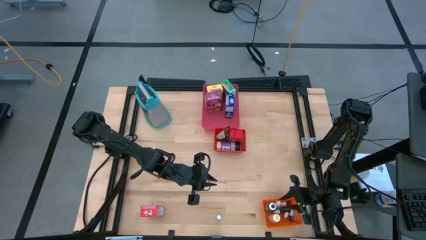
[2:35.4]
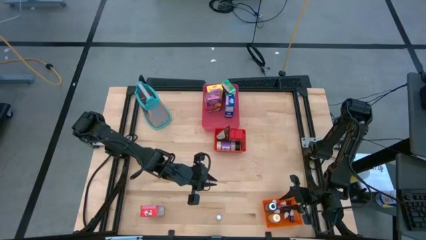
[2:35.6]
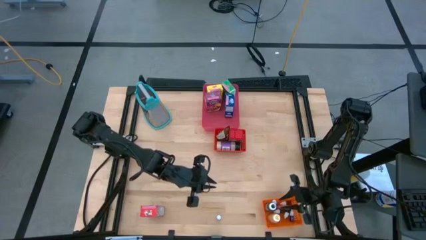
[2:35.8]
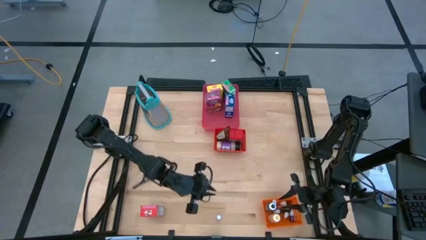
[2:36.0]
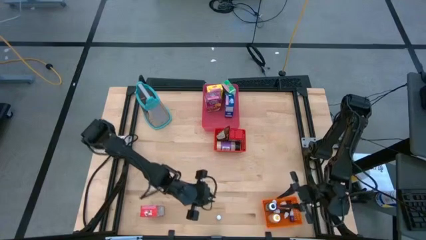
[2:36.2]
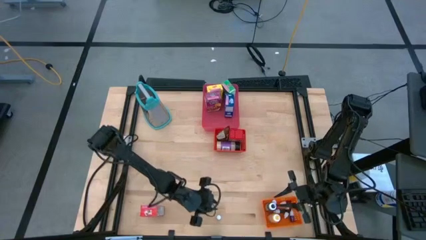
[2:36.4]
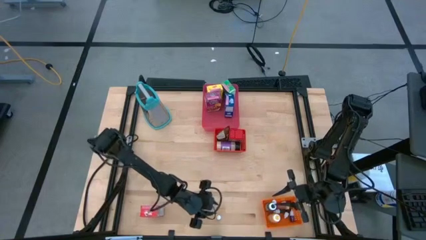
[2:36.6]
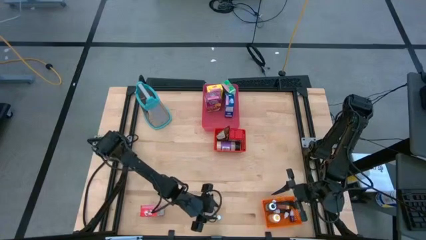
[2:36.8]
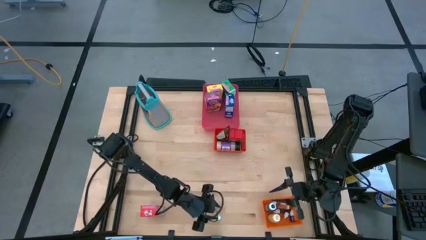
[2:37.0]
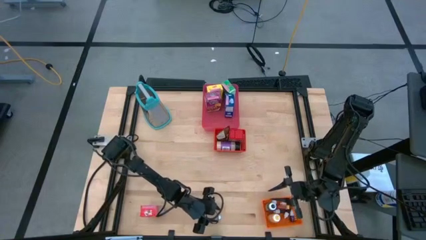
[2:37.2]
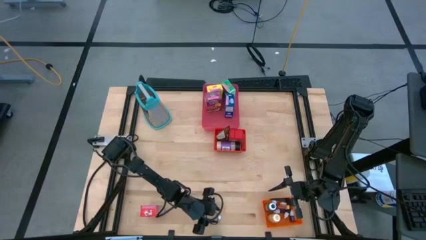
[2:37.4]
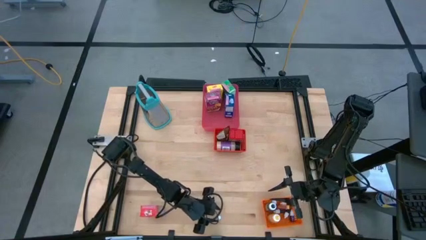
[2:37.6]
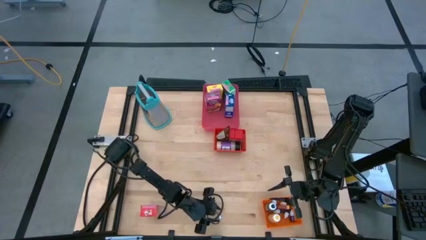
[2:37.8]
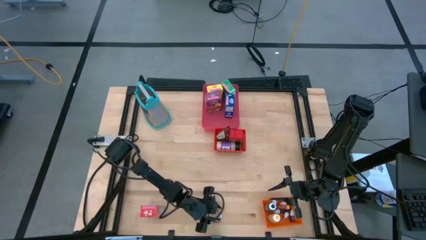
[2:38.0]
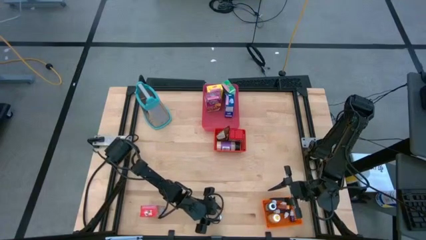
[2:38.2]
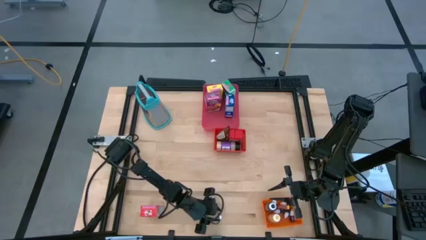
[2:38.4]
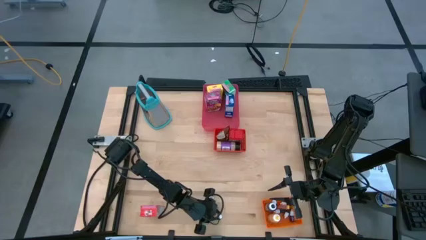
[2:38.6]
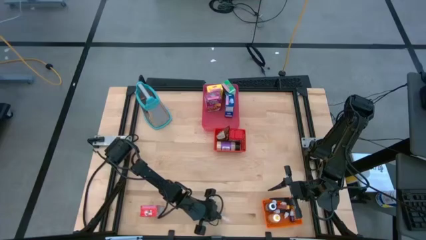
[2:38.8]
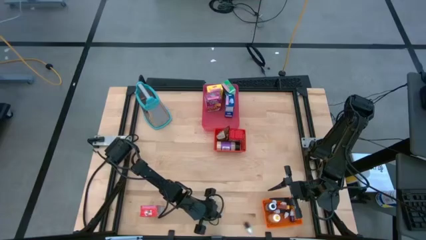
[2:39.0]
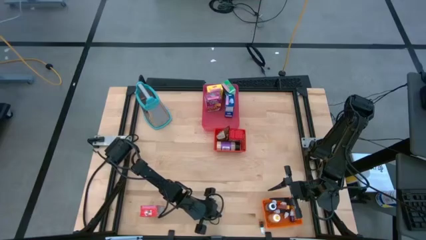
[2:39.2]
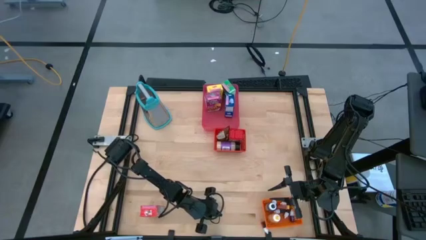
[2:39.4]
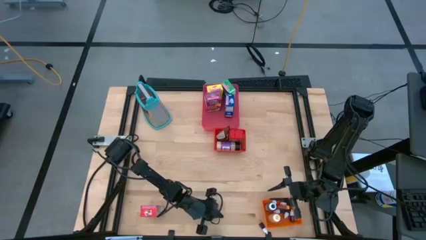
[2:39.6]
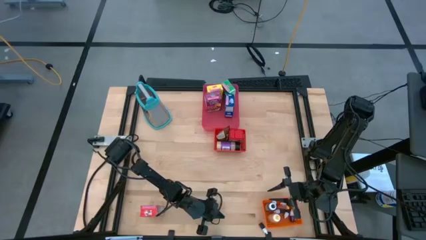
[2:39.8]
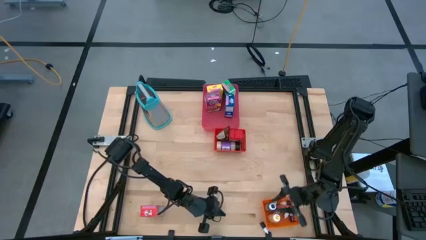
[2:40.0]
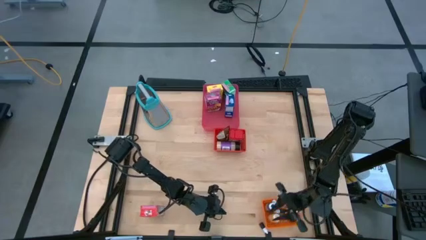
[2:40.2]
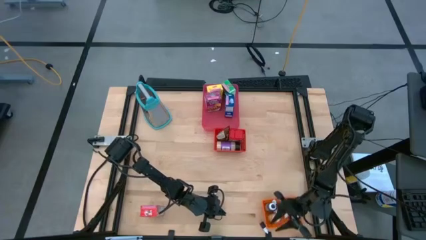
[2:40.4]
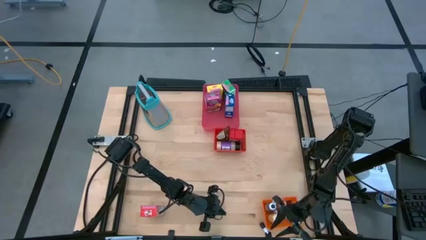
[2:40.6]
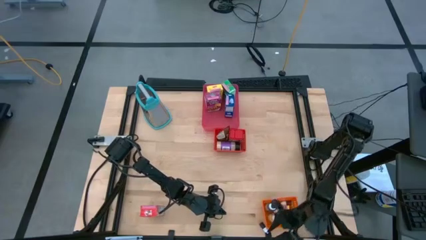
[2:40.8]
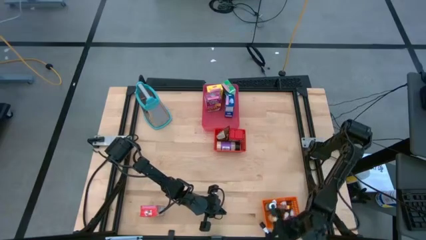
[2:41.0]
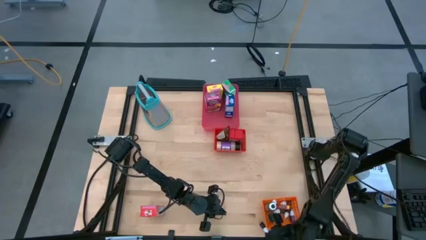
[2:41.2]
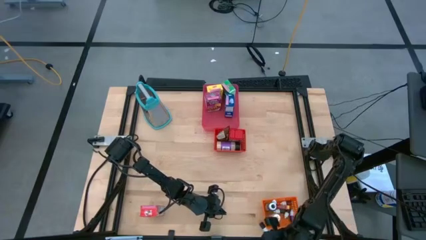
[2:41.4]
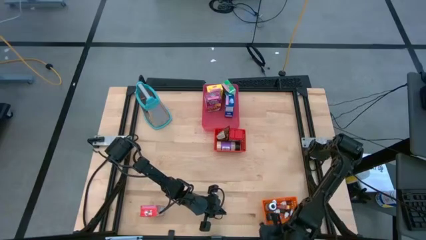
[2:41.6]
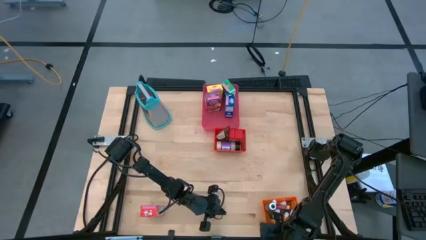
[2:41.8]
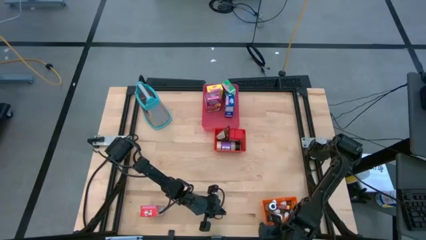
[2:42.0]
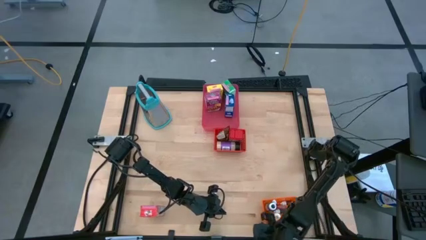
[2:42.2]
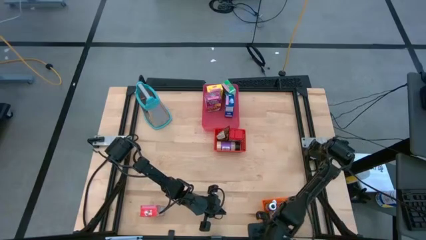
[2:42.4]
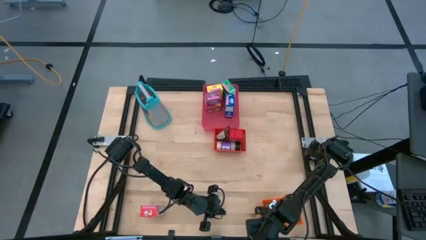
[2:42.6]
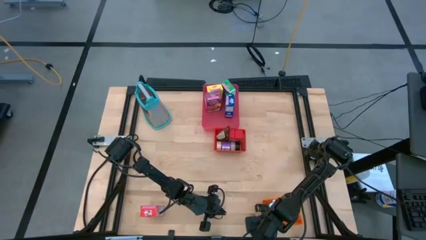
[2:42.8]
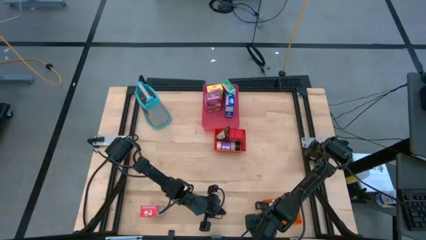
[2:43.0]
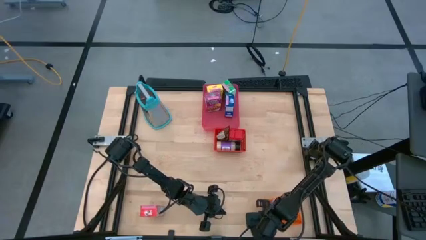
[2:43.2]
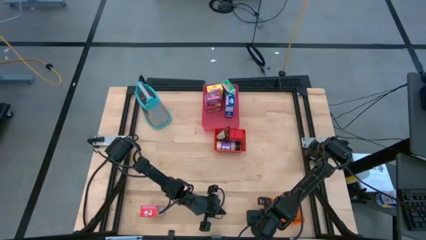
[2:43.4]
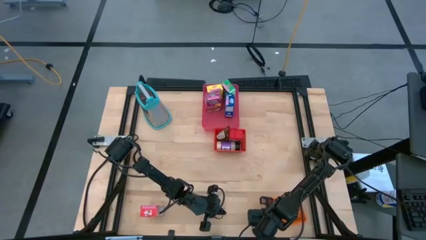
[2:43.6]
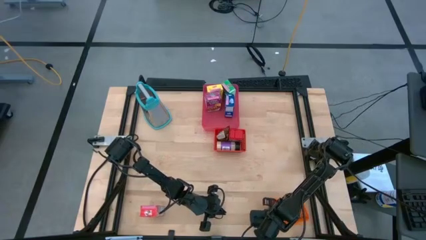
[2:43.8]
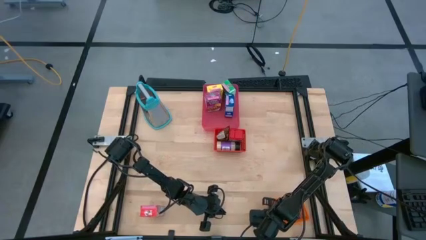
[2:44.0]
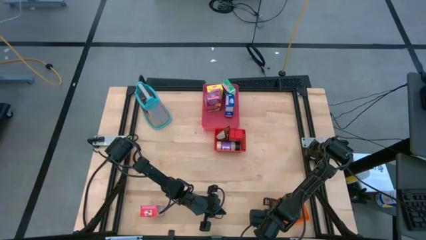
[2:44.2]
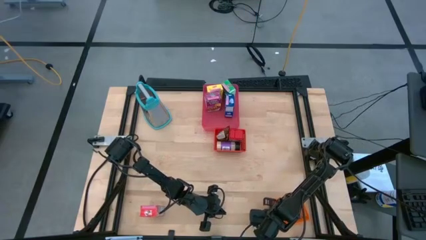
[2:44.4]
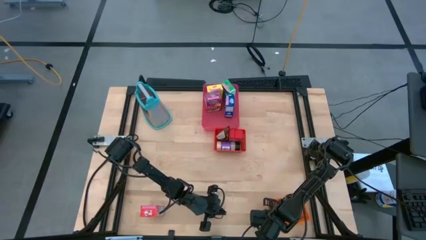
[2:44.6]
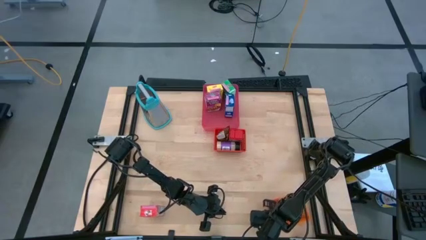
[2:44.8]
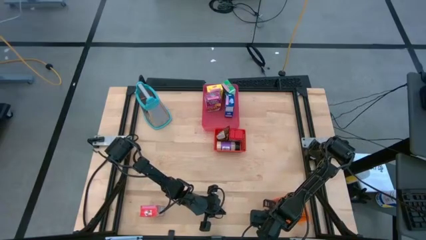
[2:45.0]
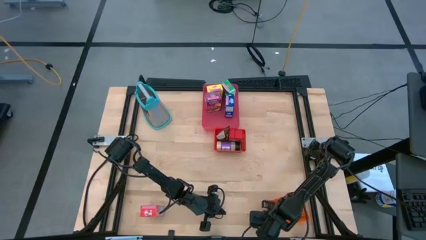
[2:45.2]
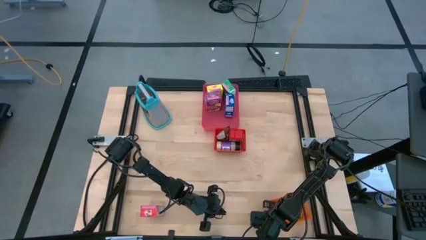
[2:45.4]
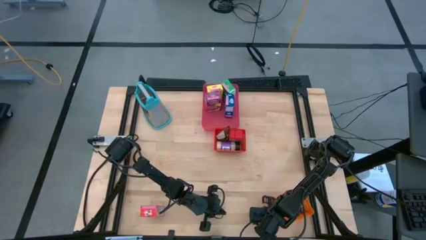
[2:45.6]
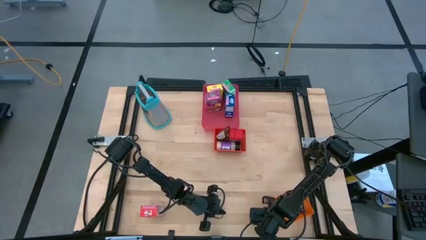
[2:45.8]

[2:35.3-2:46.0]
Task: Pick & Place Kitchen Items
Put the red food coloring bottle into the orange bin
